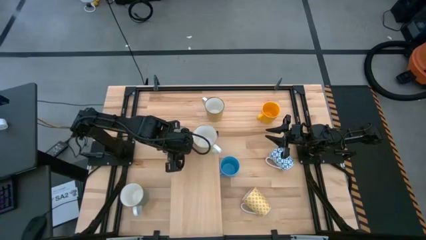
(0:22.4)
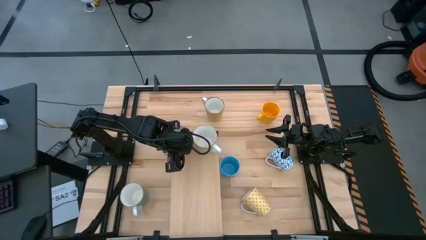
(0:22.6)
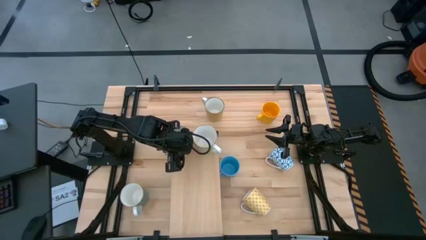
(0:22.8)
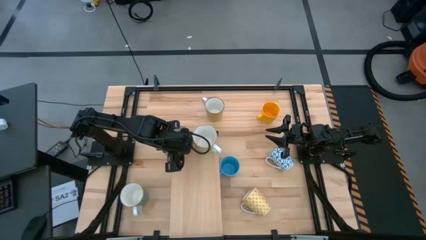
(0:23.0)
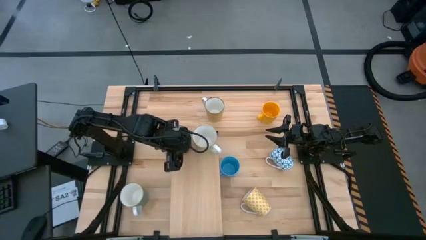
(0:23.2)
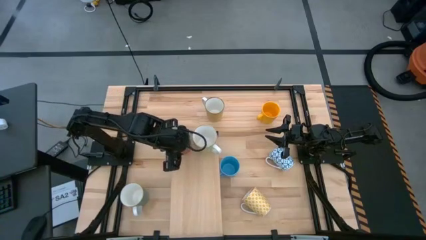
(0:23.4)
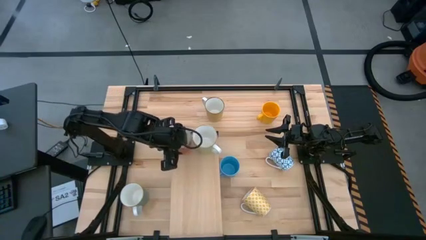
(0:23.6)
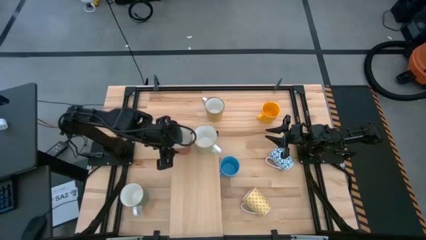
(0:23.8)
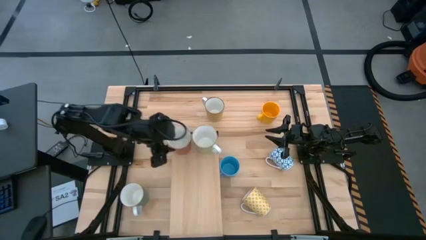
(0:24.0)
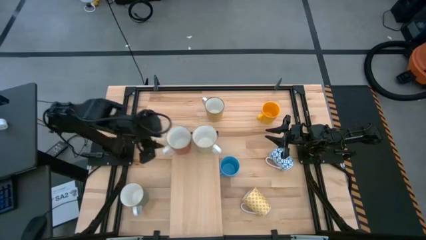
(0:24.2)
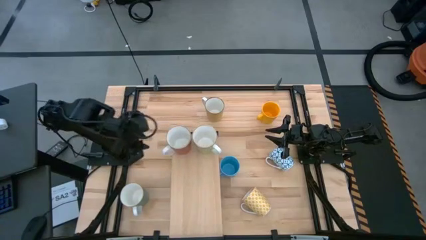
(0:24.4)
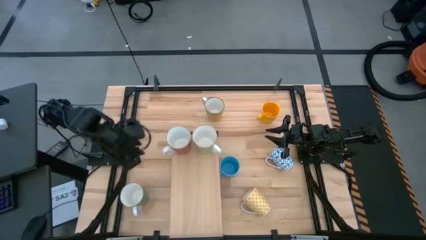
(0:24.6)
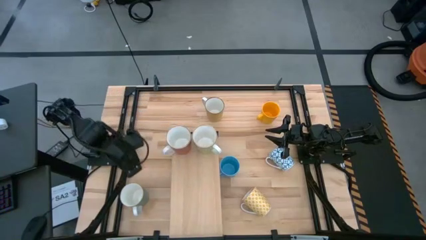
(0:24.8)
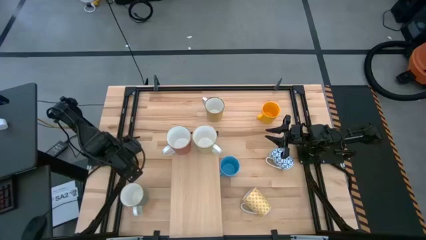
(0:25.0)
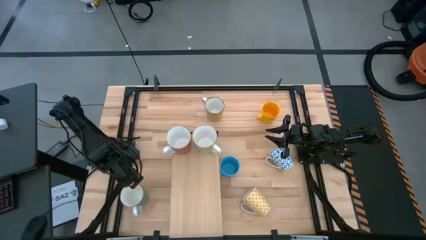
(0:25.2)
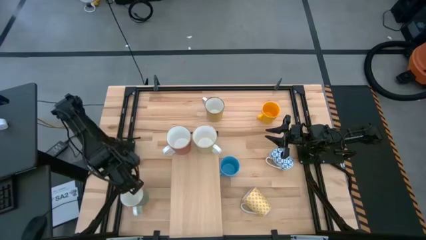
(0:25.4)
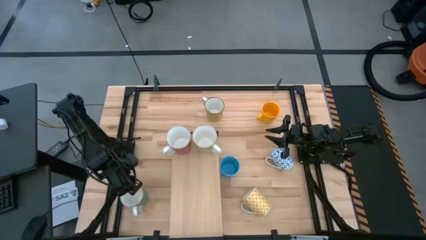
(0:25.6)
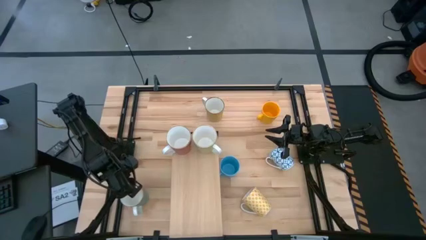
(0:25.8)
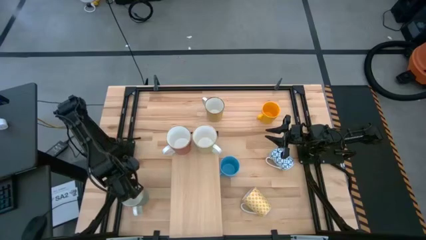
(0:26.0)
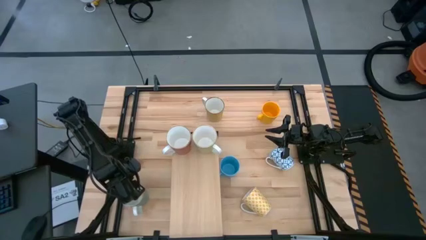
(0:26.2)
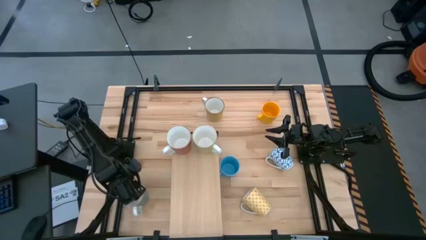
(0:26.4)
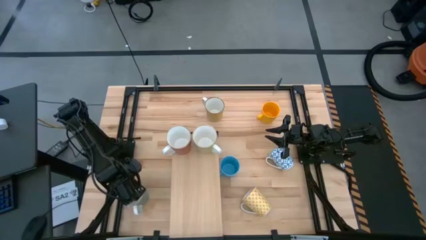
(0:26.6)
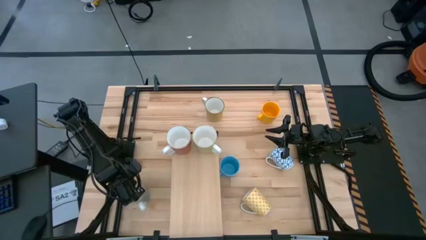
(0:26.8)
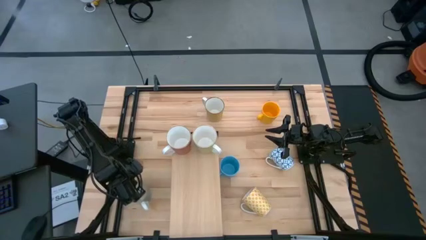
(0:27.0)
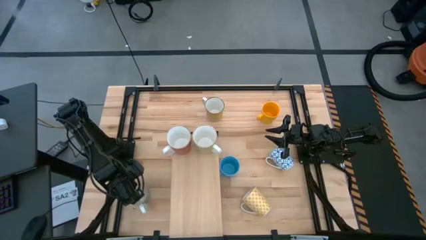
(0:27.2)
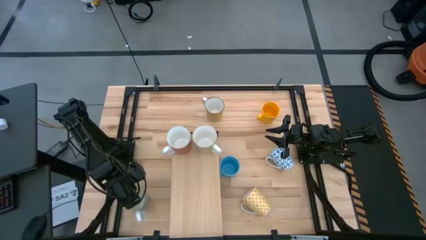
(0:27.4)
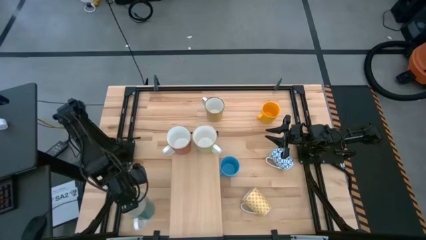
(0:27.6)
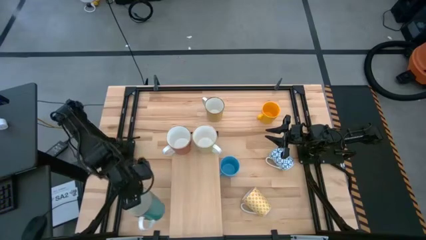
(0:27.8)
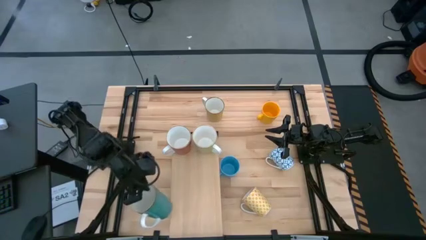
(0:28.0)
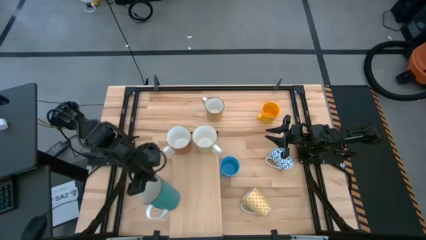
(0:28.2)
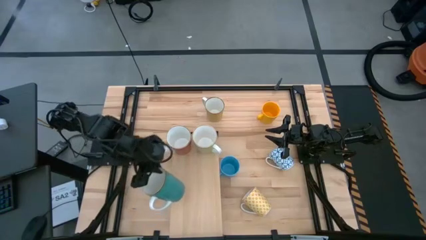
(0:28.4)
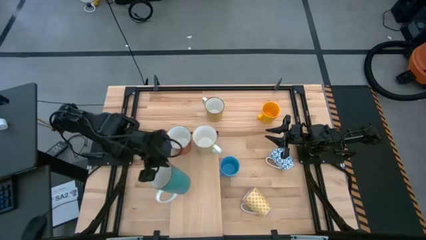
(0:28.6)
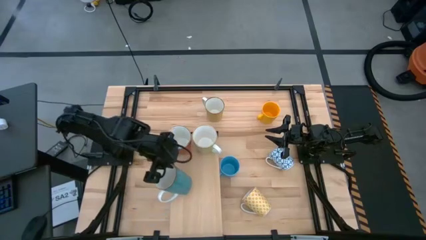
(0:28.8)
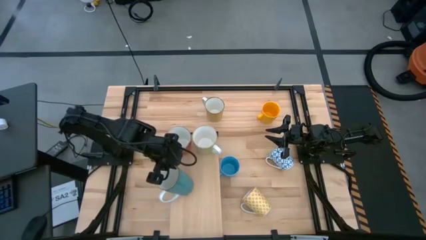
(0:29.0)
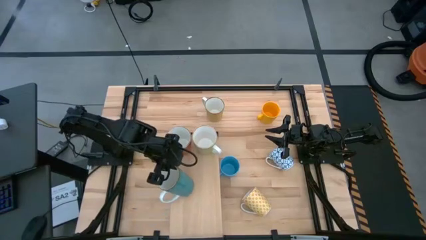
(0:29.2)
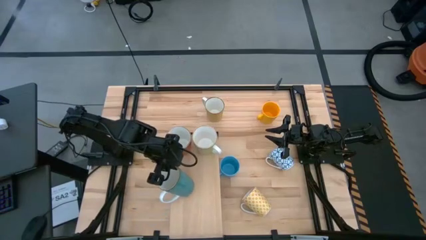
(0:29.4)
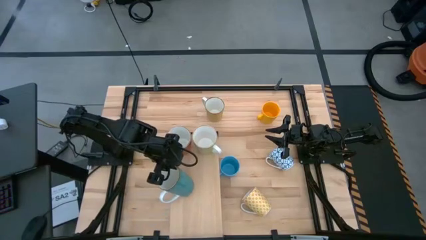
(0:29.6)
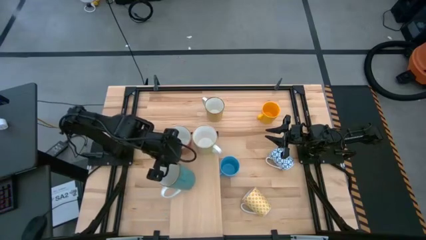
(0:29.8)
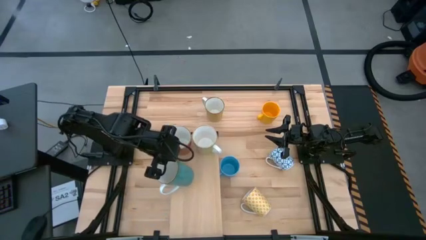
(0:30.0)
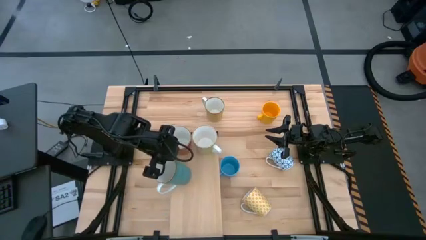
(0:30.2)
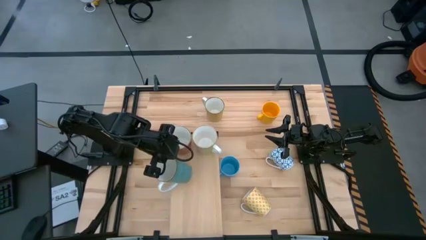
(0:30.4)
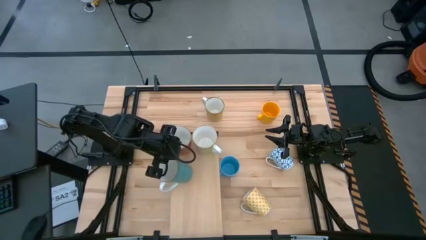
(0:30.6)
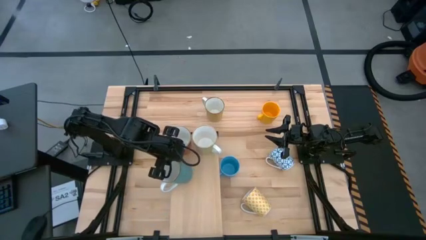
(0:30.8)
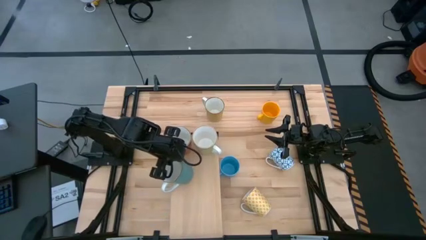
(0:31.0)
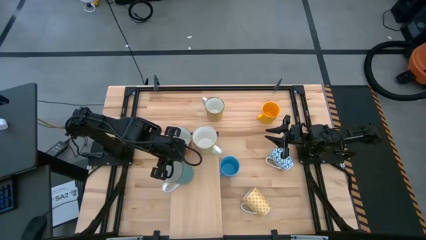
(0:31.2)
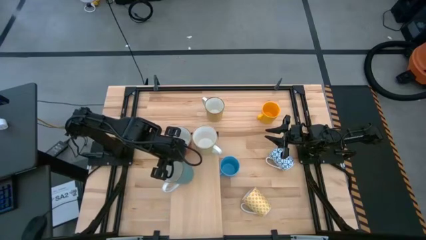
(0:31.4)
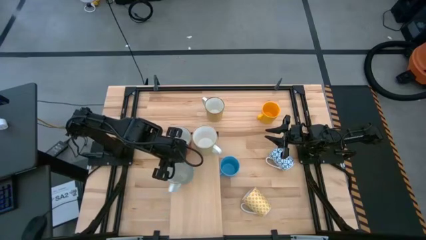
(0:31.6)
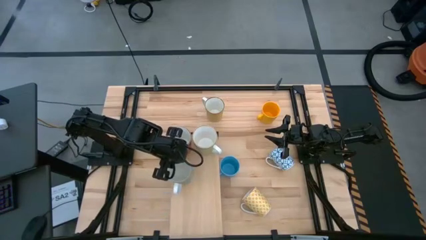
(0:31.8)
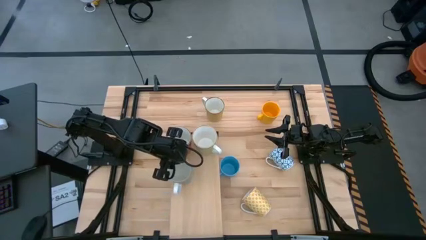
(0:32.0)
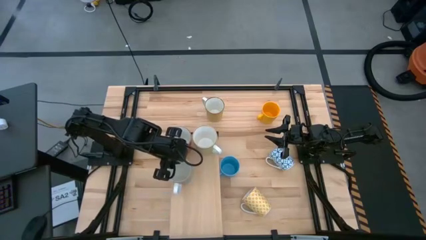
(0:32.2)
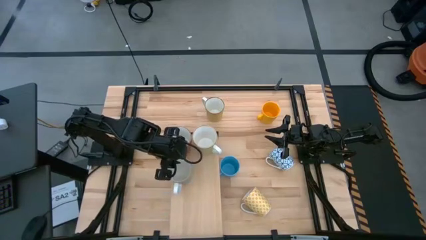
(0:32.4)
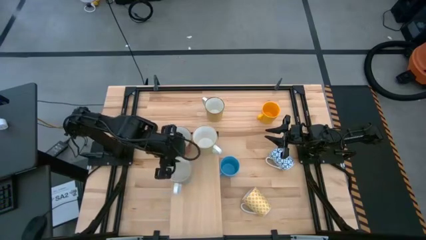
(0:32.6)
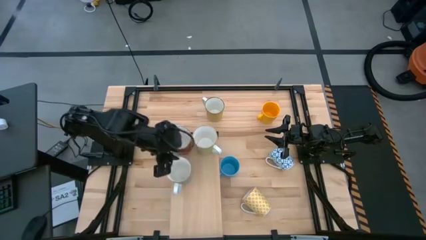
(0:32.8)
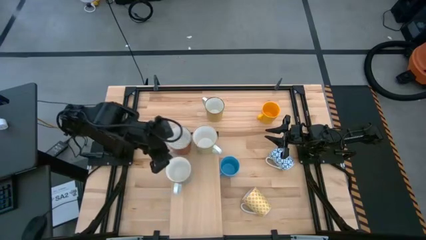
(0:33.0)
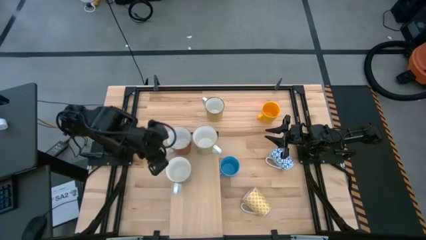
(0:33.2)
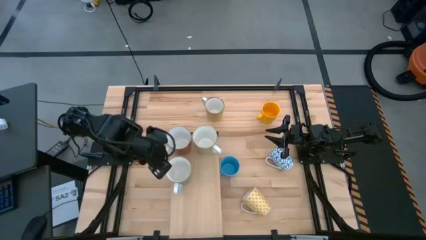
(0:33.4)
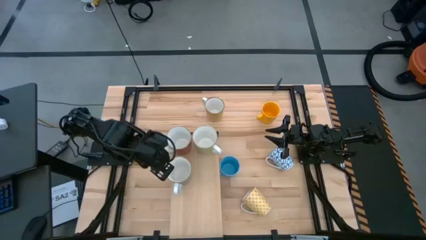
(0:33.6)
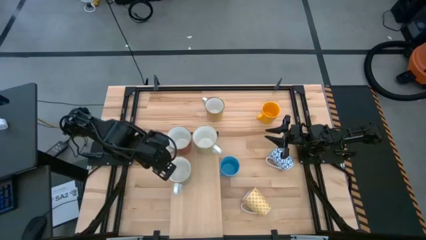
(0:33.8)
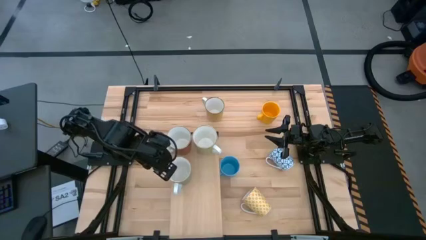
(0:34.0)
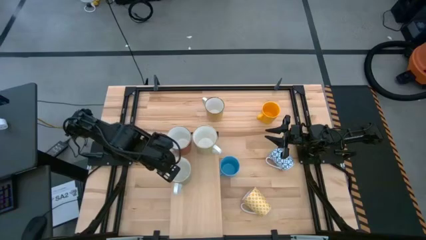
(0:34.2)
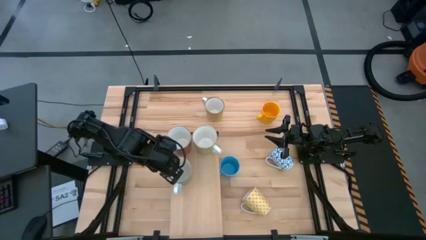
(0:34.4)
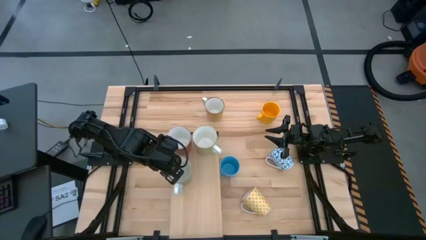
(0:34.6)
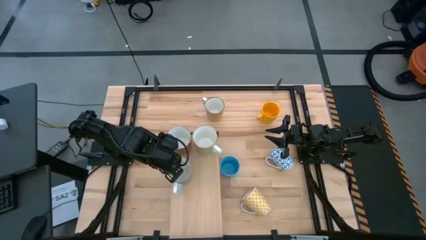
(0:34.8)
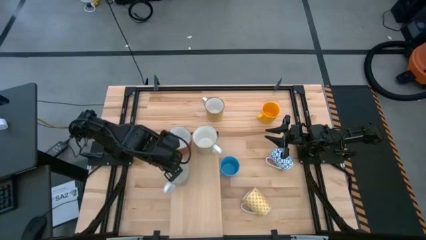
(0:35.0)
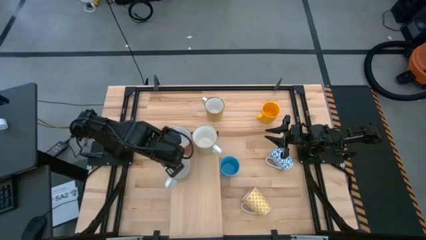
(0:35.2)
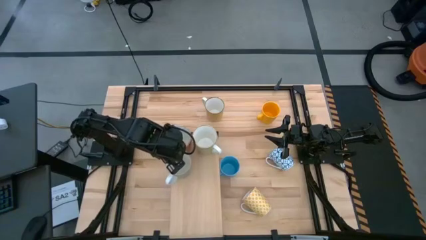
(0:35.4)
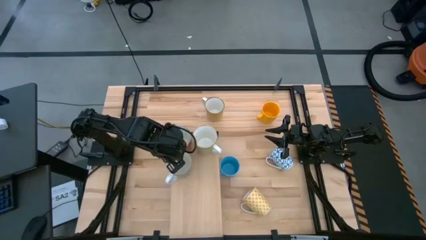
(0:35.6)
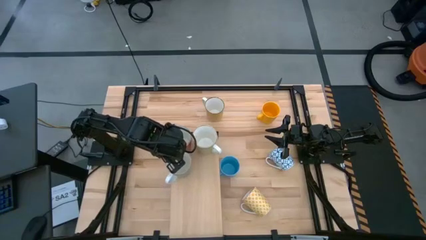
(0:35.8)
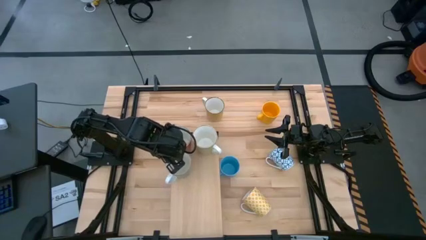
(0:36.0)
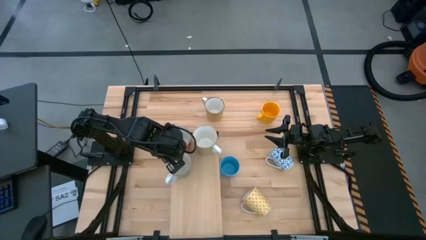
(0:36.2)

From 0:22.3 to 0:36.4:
Task: Place coffee mugs
Put the left blue mug on the shelf aligned with the red mug

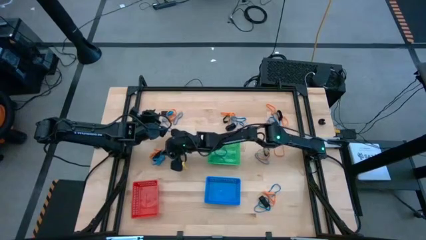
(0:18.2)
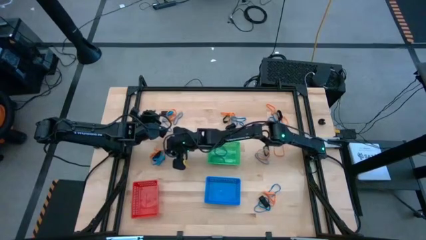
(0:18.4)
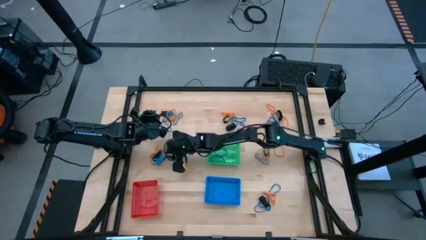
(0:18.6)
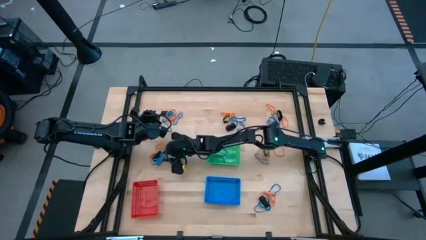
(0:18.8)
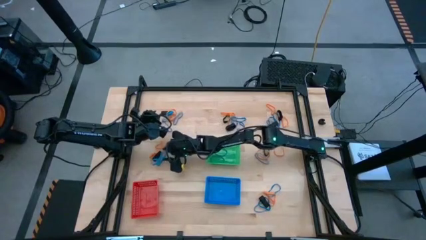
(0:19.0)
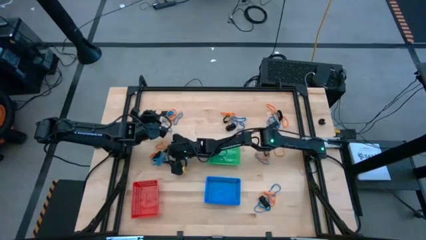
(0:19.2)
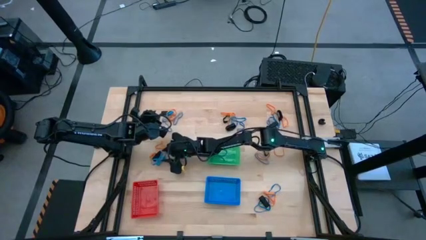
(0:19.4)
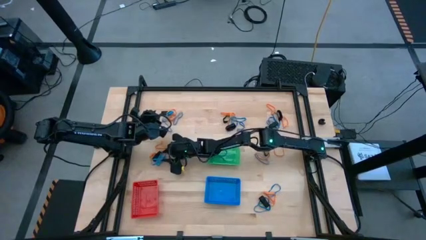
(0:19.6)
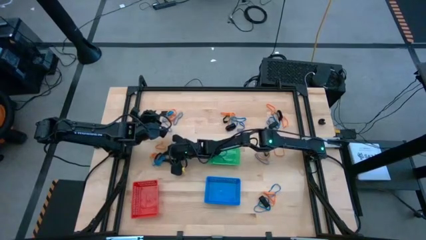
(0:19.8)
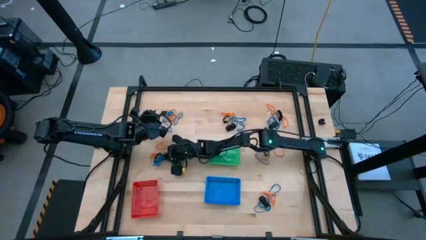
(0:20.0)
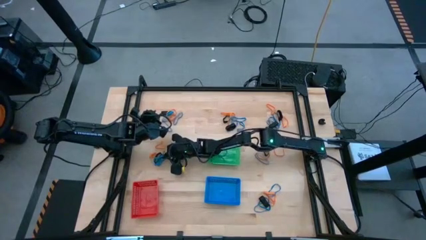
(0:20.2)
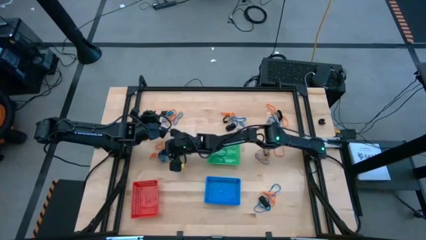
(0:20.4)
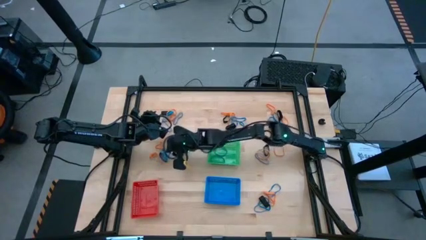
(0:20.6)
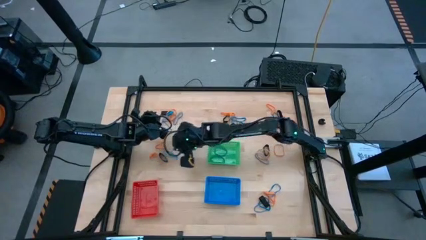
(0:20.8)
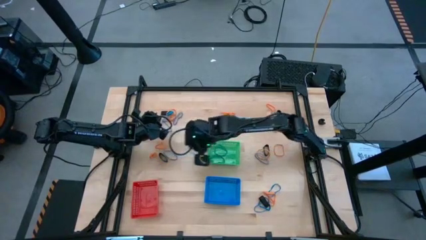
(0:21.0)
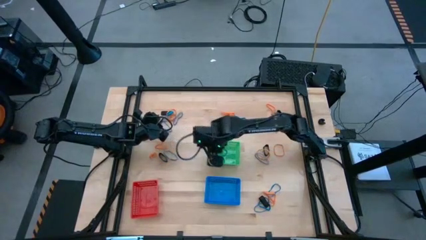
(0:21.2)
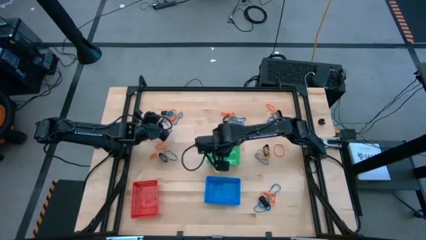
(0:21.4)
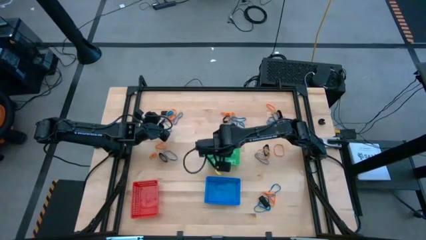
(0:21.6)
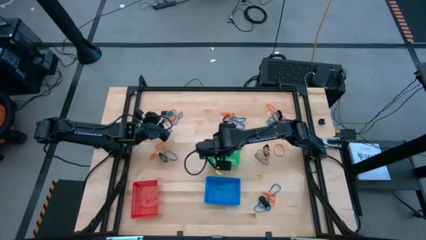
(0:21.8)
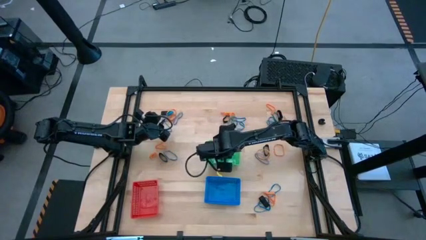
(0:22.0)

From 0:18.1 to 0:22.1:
Task: Sort rubber bands into baskets
Put the blue rubberband into the green bin
